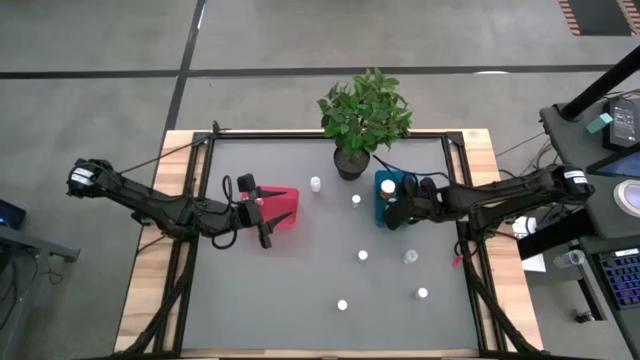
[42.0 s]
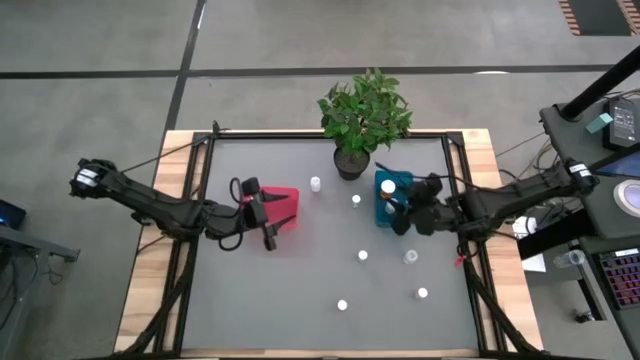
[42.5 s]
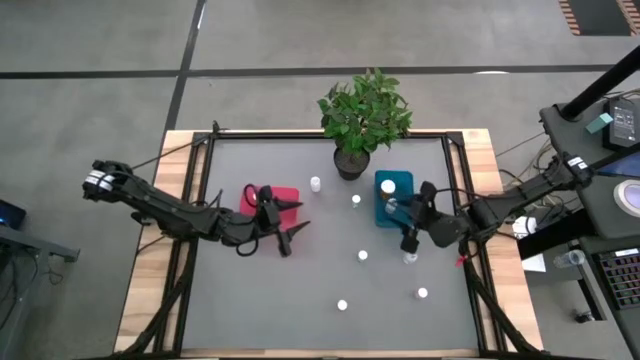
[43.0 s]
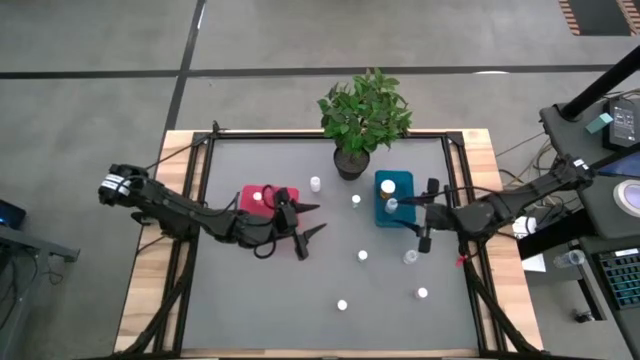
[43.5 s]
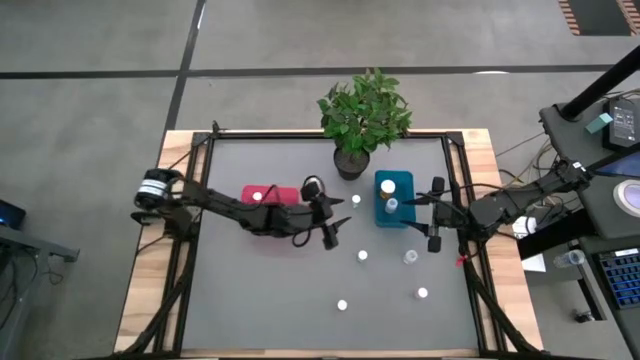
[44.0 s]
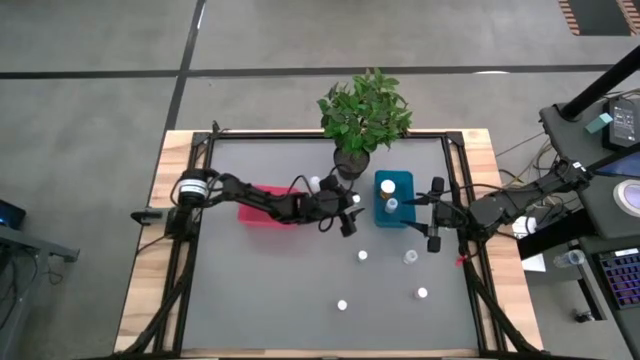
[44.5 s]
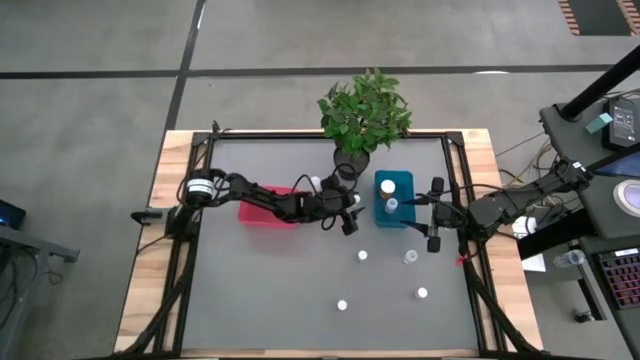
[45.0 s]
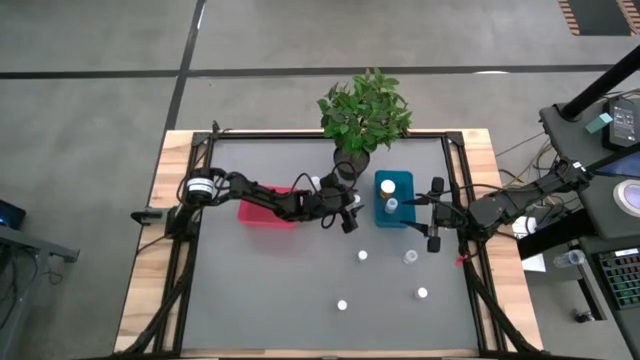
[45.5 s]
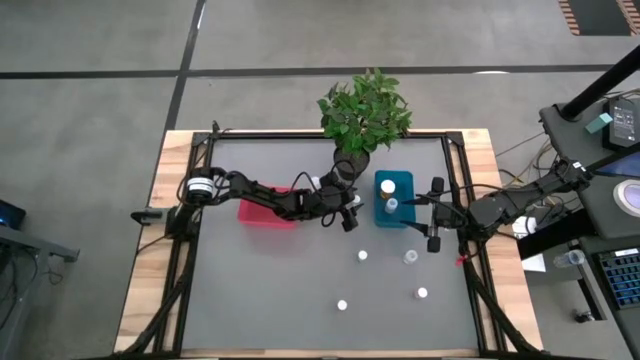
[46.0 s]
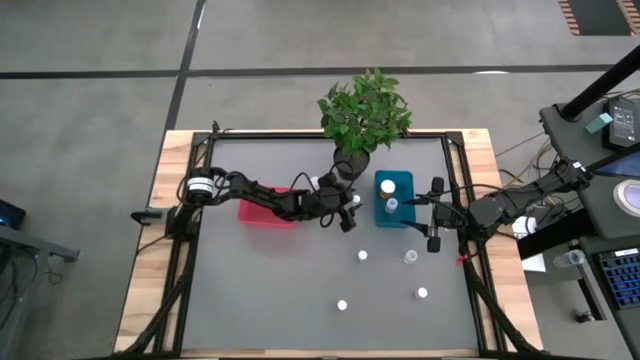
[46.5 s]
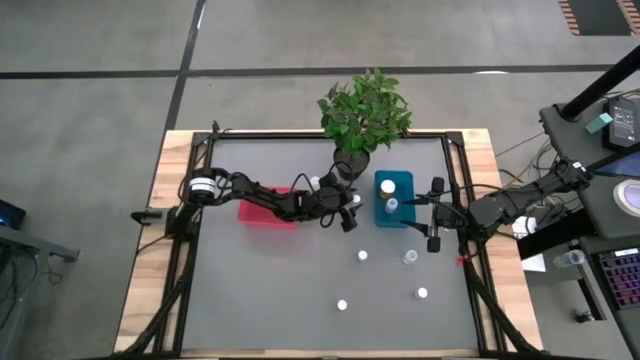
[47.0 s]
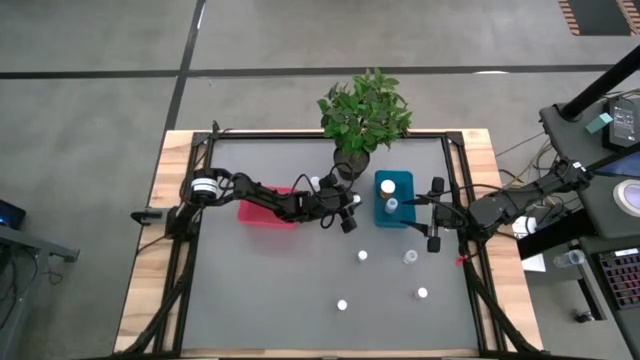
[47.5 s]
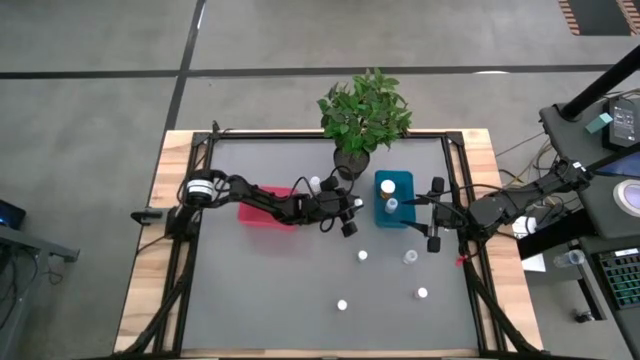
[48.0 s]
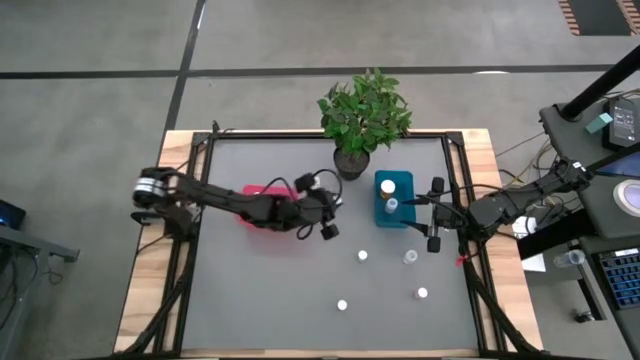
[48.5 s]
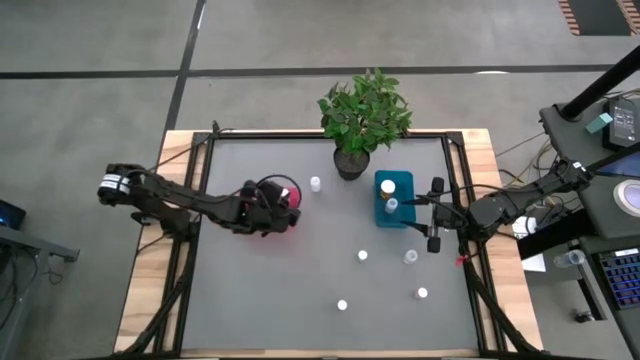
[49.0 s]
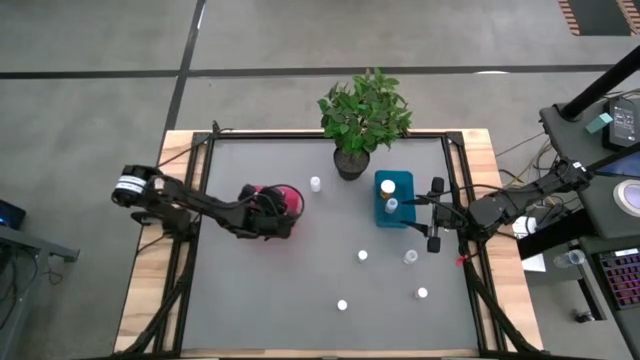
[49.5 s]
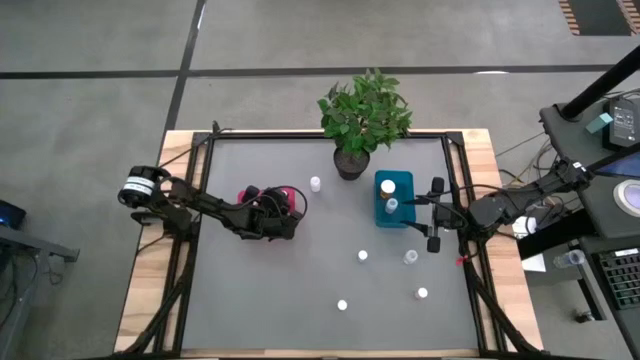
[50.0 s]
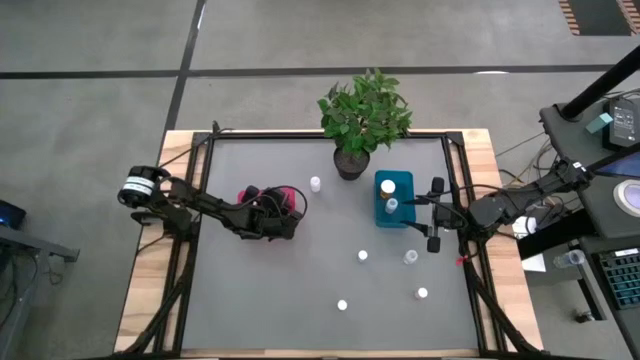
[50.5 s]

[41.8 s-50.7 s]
Task: Pick and place medicine bottles into bin by pill shape (circle, oval)
Put the small blue pill bottle into the pink bin

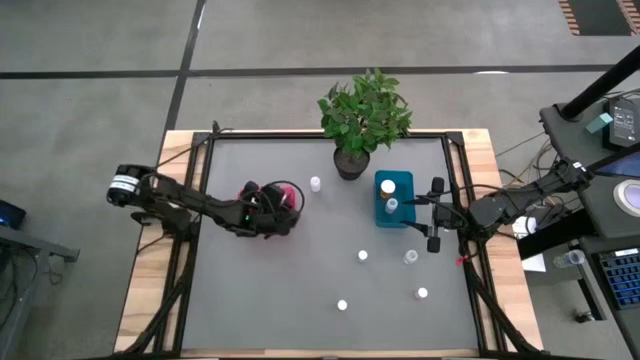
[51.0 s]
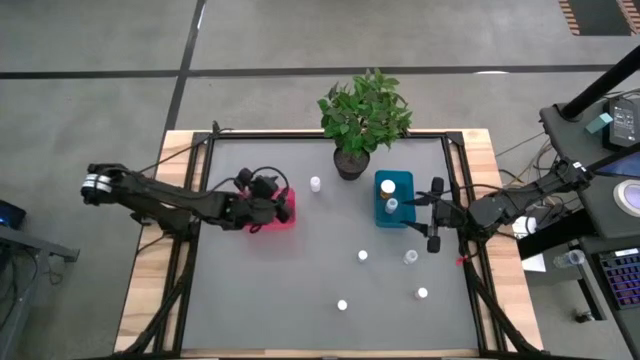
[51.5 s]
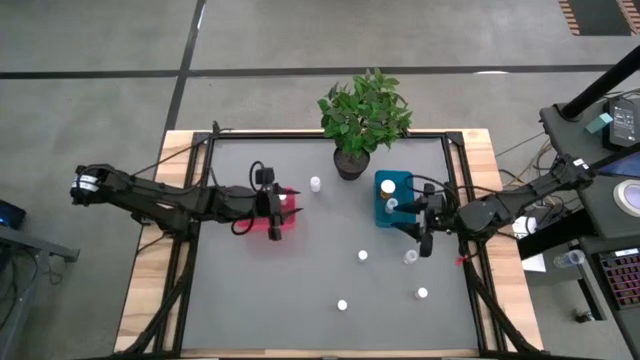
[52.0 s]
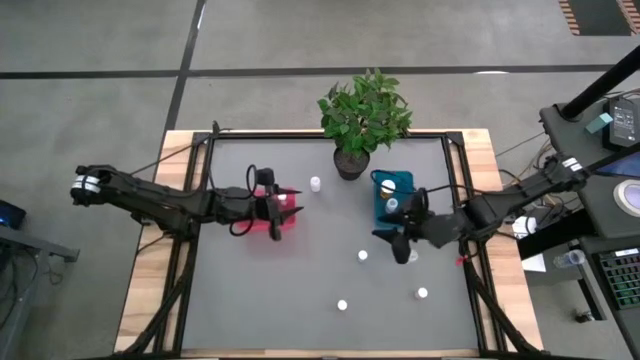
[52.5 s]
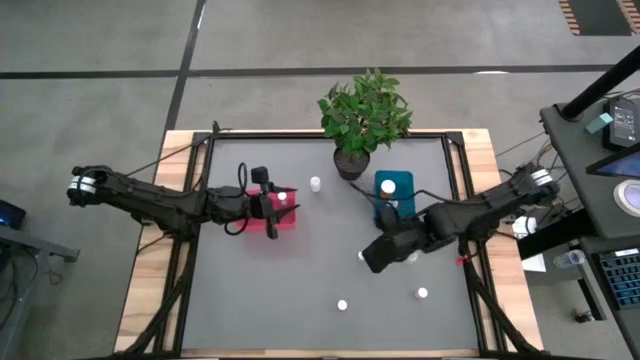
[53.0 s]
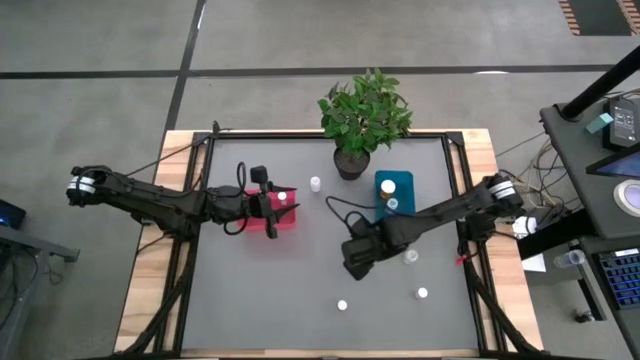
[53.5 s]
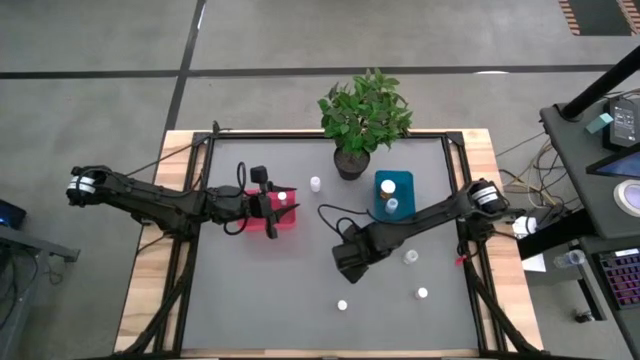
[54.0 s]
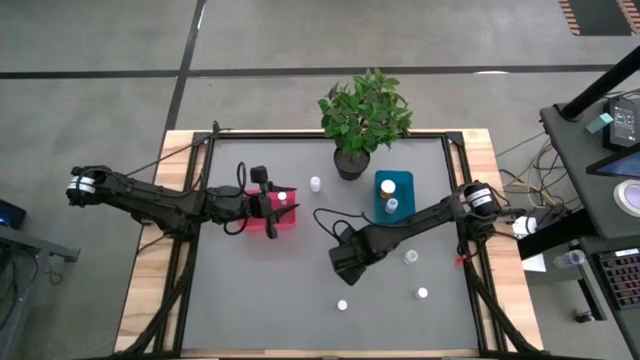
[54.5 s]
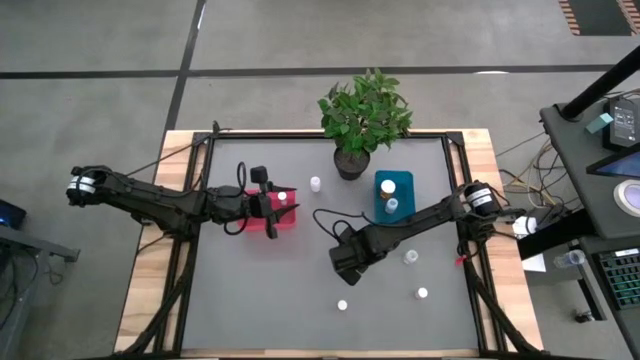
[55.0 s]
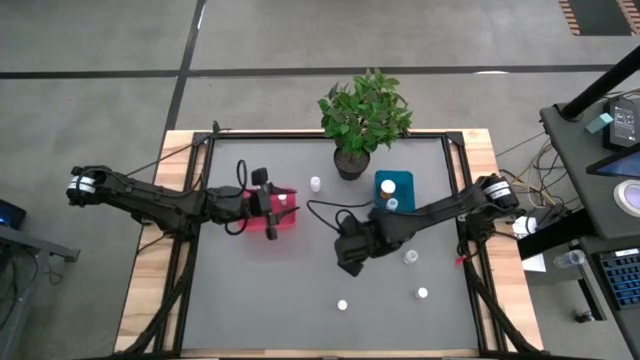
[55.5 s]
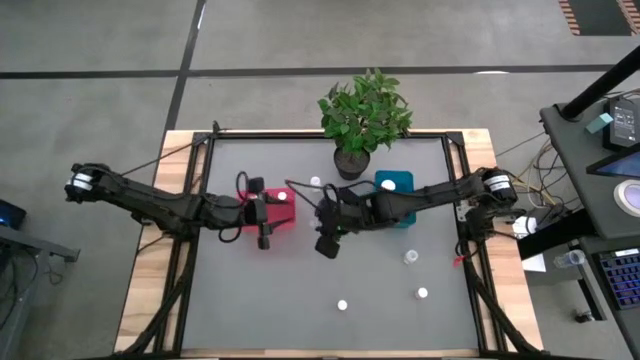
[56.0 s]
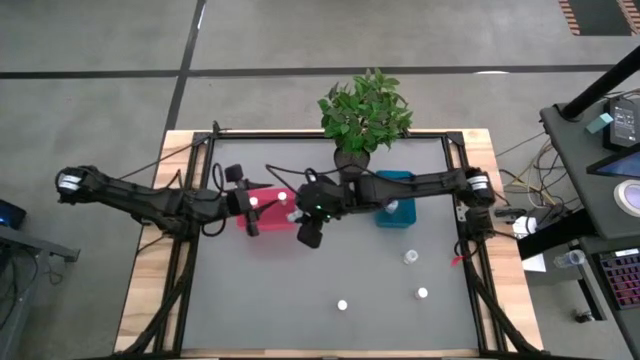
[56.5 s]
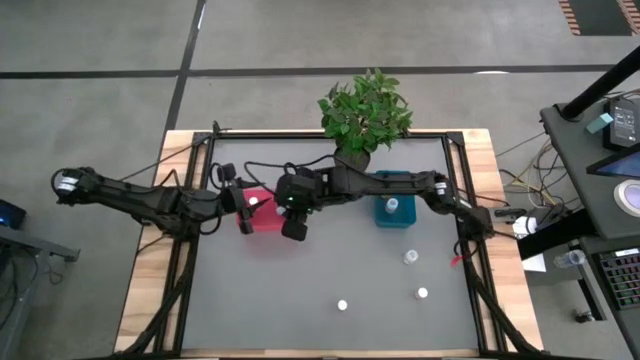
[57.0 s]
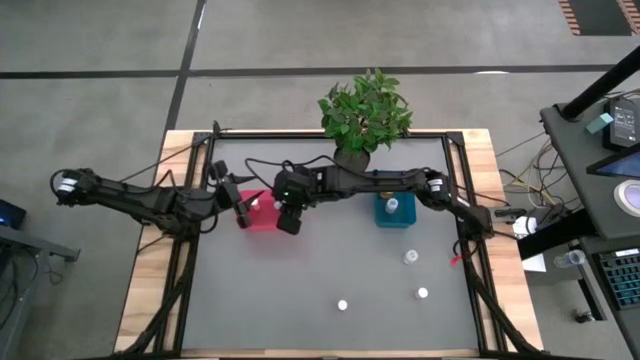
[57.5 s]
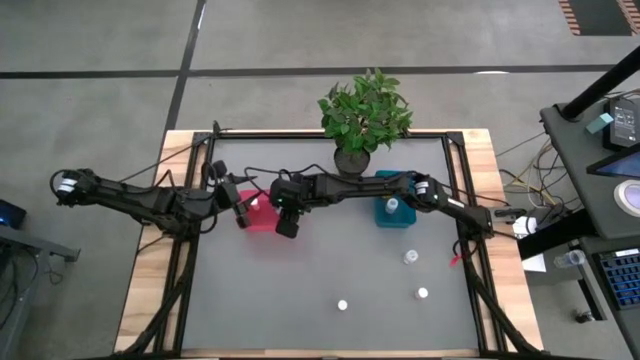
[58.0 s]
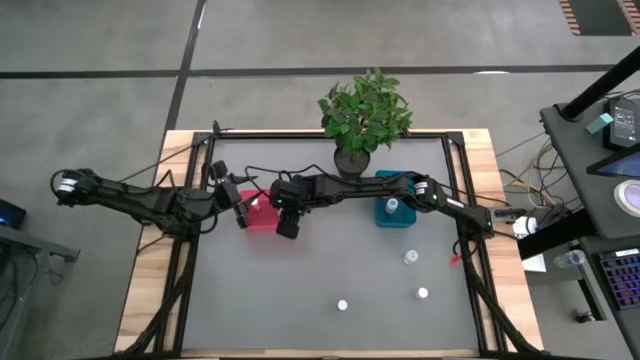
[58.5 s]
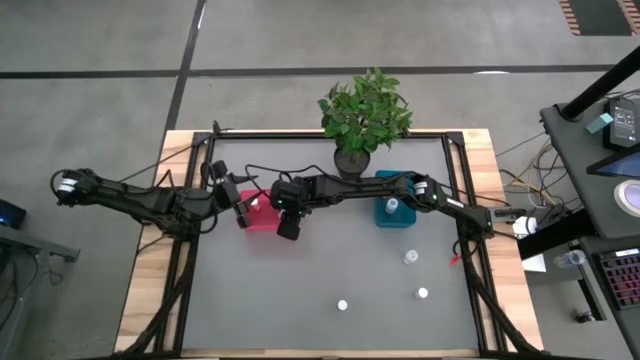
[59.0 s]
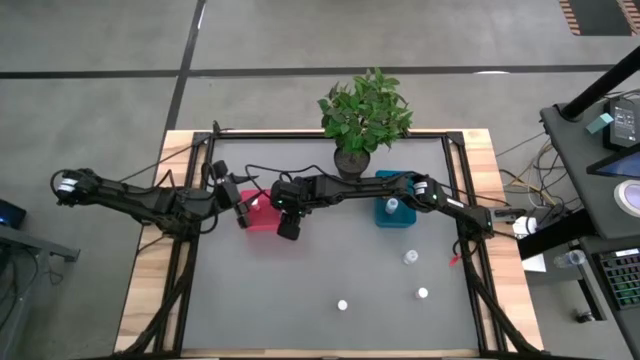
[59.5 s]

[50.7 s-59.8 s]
Put the small blue pill bottle into the pink bin

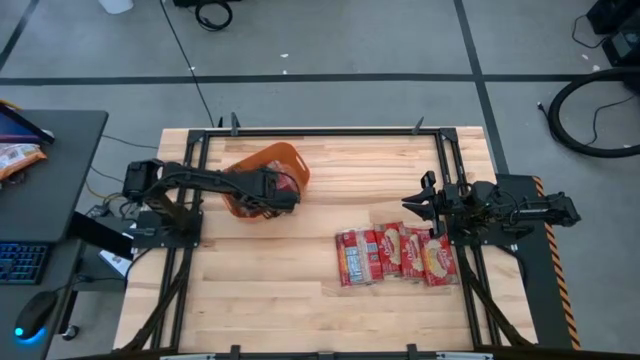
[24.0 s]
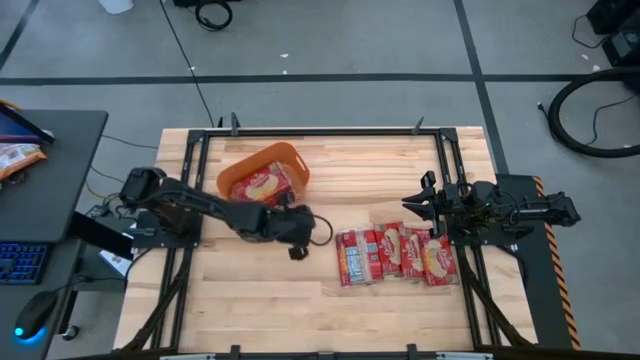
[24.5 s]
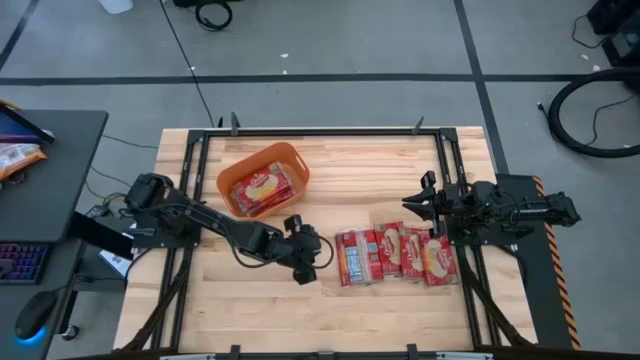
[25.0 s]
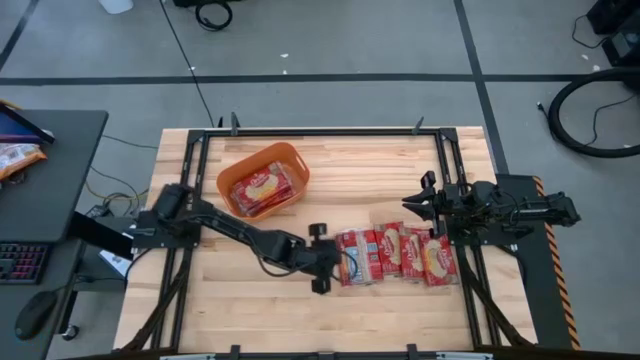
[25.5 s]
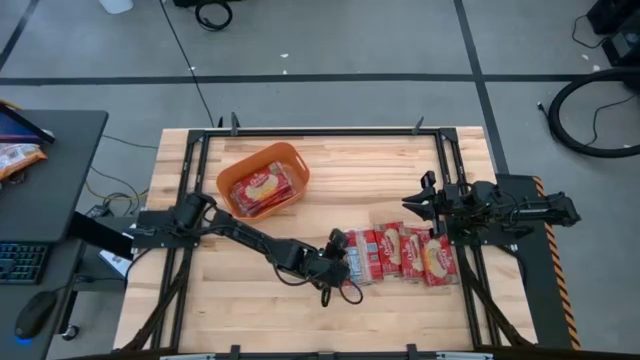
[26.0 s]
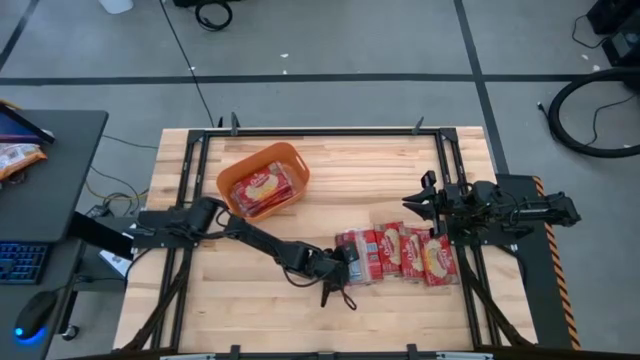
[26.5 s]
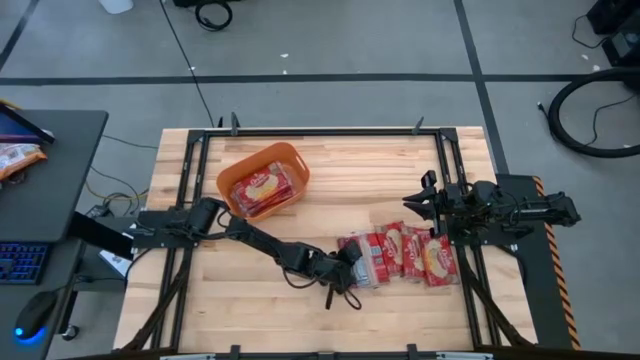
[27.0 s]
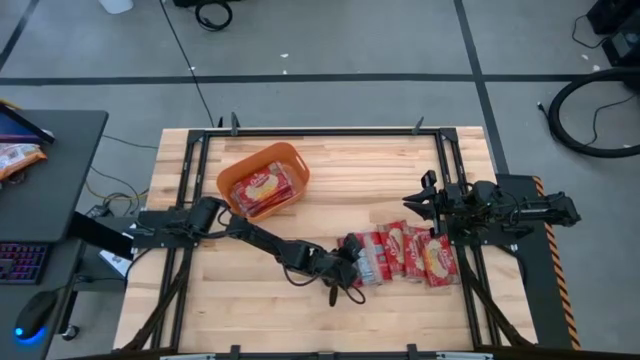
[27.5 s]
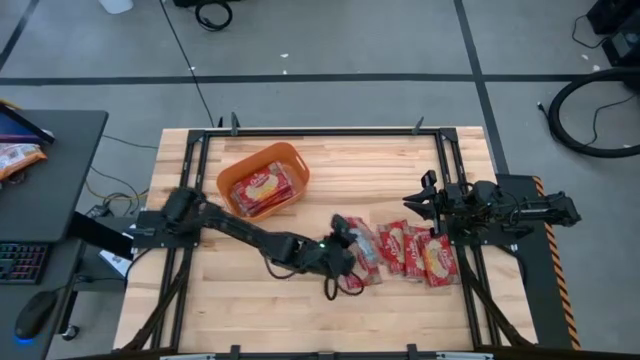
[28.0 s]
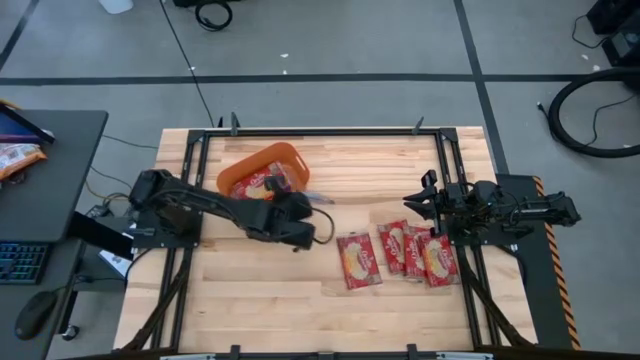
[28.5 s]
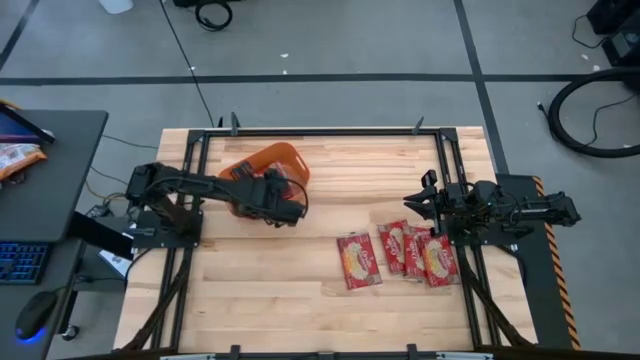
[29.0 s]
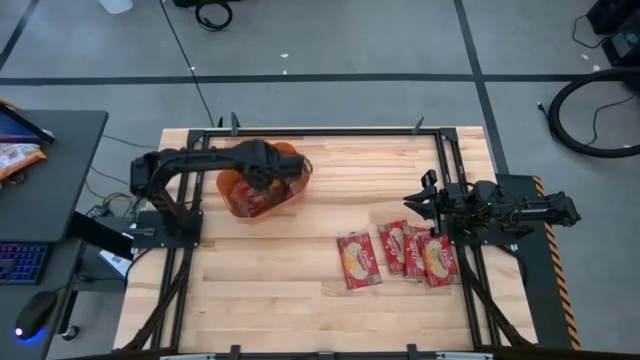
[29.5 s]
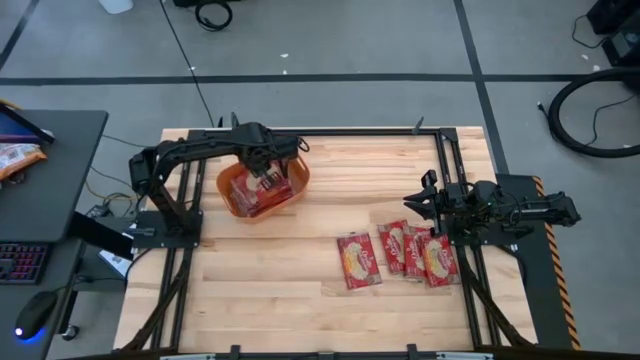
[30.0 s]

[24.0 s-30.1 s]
Task: Sort popcorn bags into baskets
Put the popcorn bag into the orange bin
